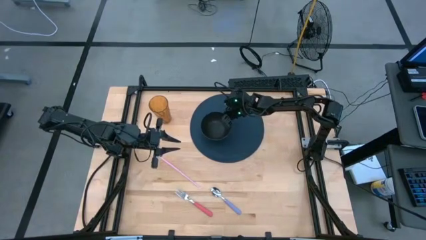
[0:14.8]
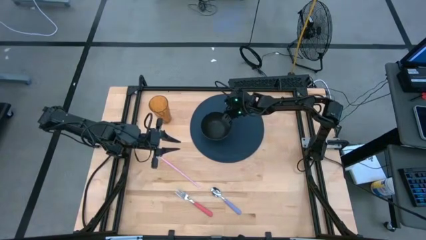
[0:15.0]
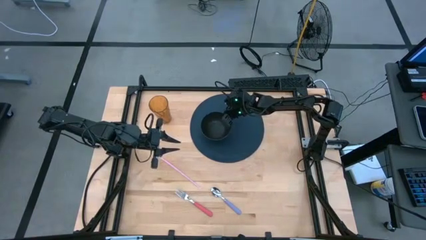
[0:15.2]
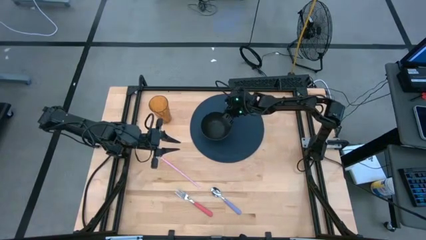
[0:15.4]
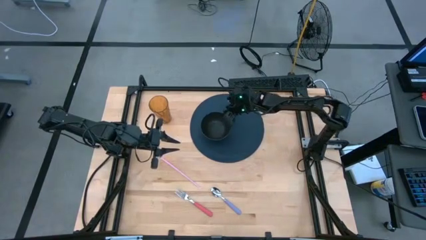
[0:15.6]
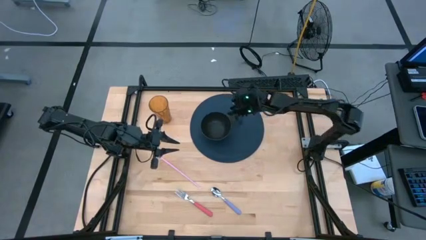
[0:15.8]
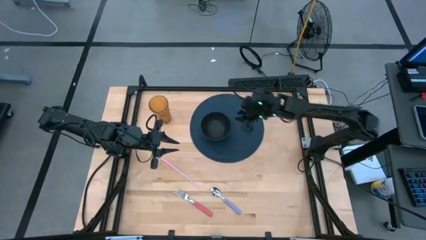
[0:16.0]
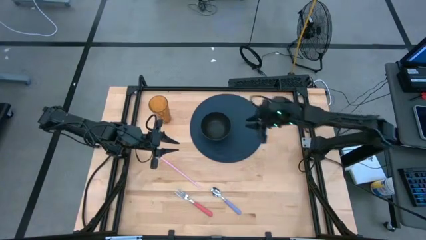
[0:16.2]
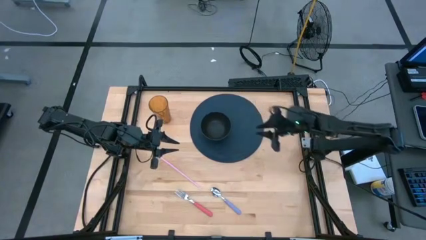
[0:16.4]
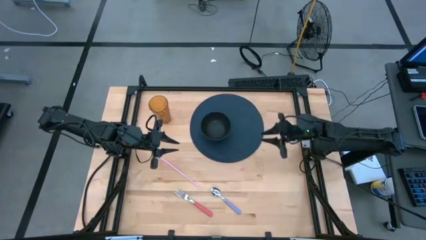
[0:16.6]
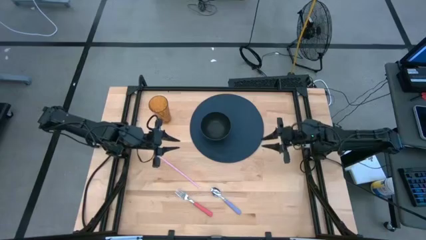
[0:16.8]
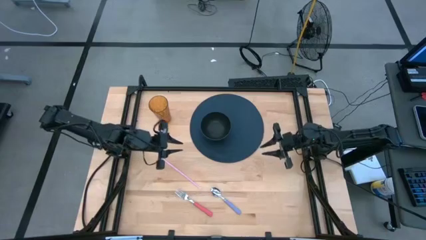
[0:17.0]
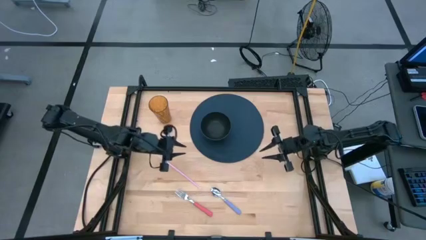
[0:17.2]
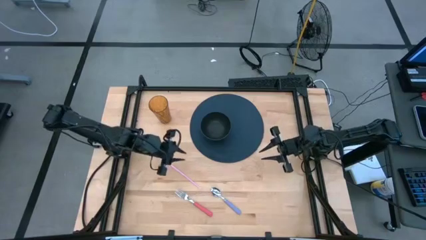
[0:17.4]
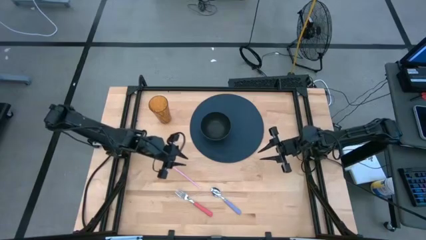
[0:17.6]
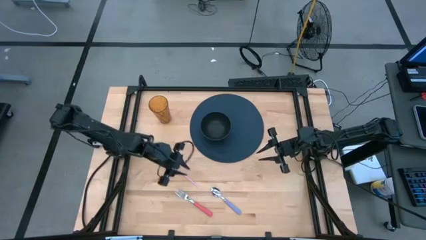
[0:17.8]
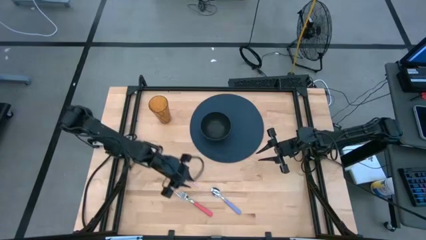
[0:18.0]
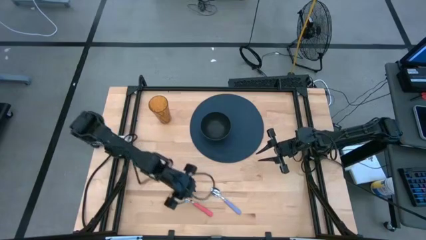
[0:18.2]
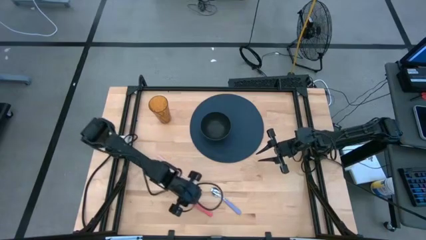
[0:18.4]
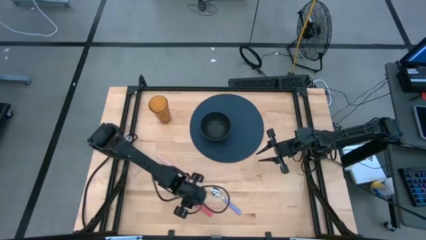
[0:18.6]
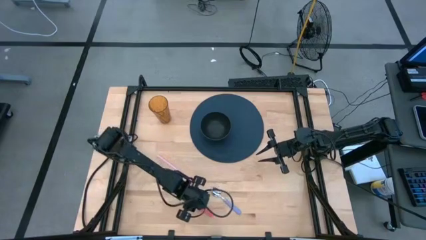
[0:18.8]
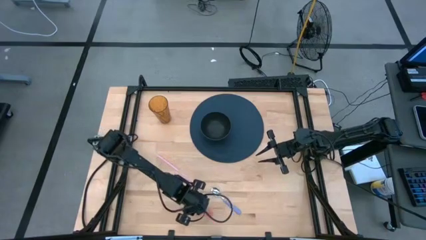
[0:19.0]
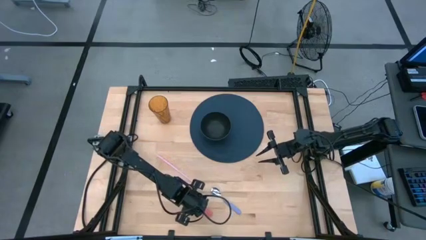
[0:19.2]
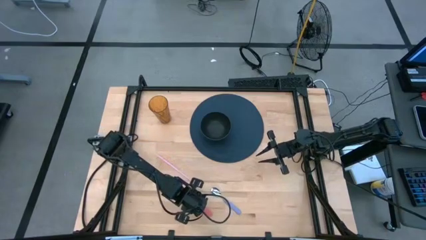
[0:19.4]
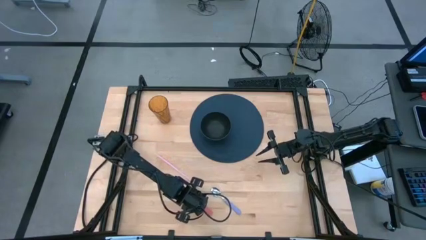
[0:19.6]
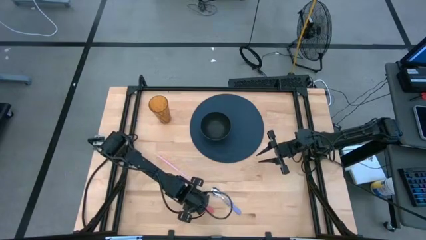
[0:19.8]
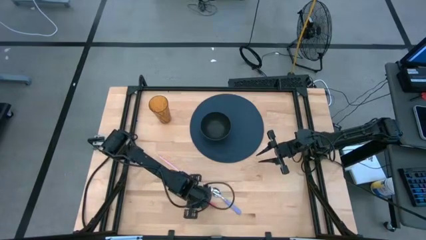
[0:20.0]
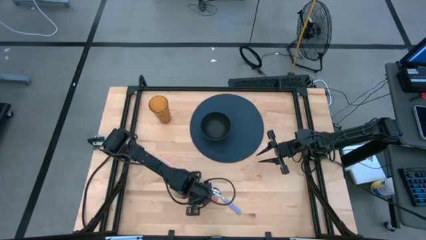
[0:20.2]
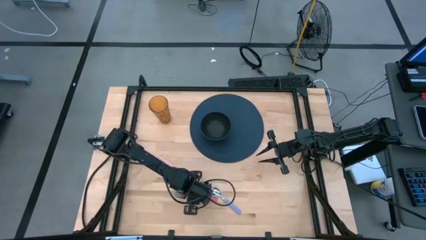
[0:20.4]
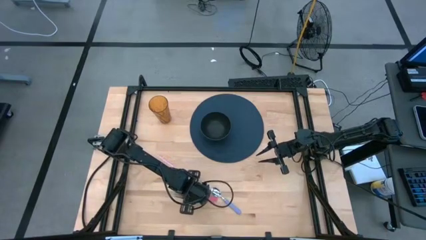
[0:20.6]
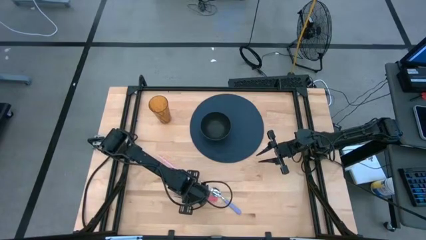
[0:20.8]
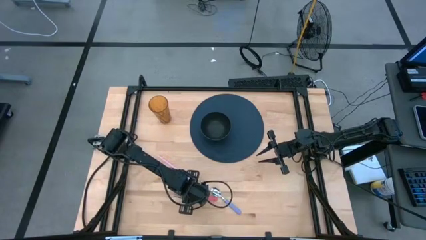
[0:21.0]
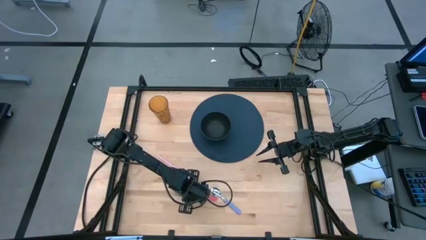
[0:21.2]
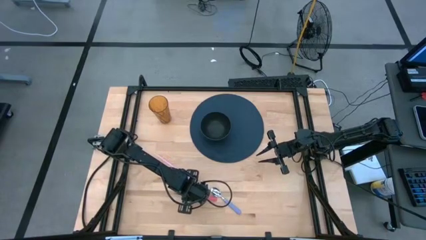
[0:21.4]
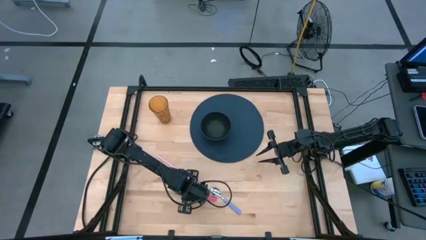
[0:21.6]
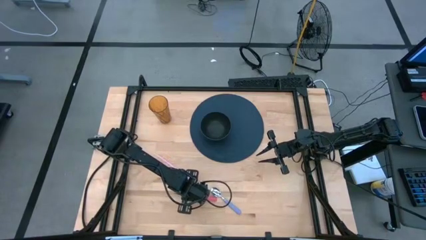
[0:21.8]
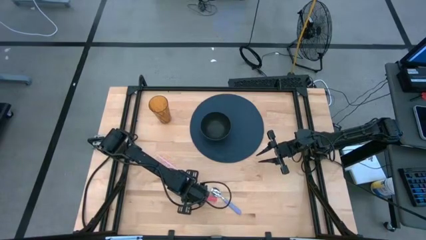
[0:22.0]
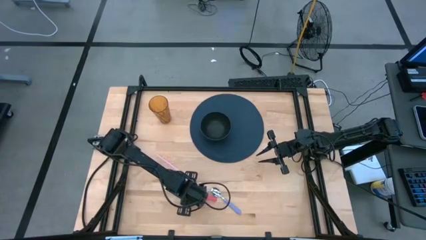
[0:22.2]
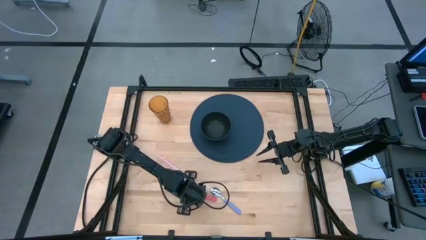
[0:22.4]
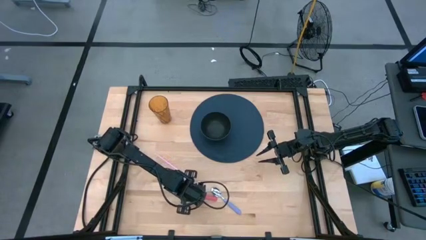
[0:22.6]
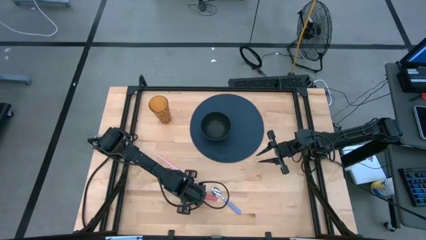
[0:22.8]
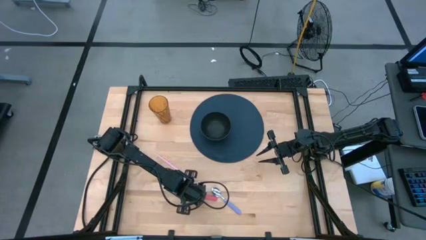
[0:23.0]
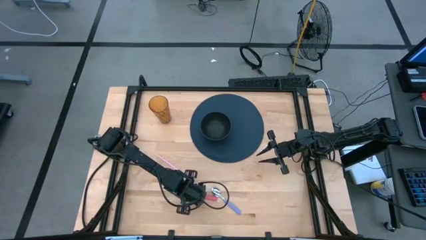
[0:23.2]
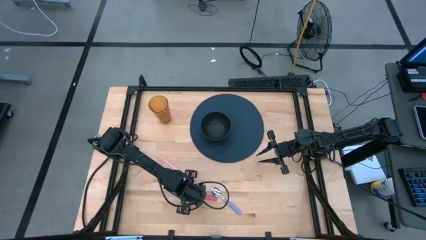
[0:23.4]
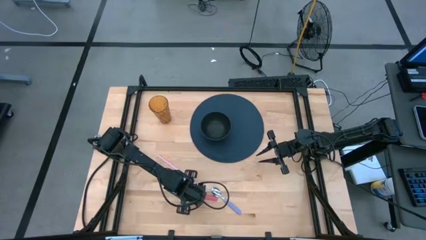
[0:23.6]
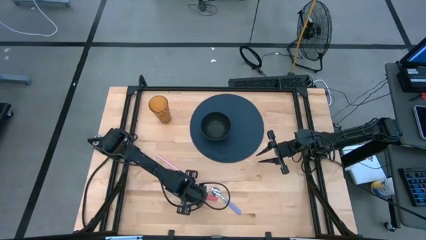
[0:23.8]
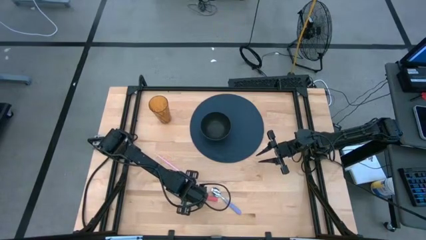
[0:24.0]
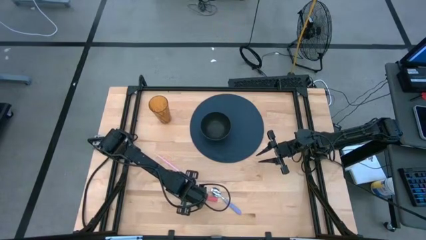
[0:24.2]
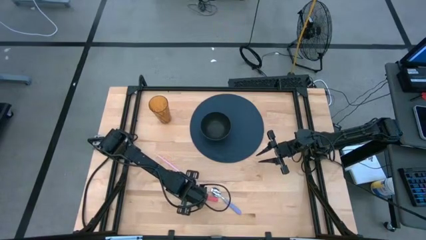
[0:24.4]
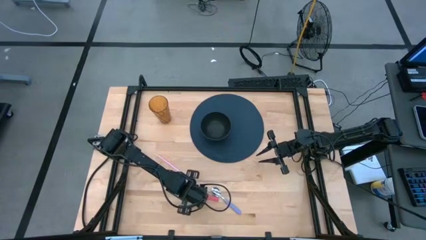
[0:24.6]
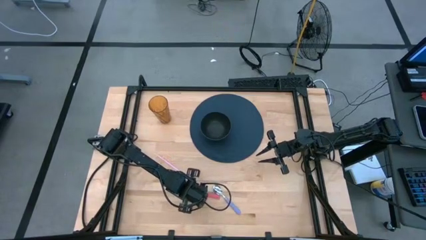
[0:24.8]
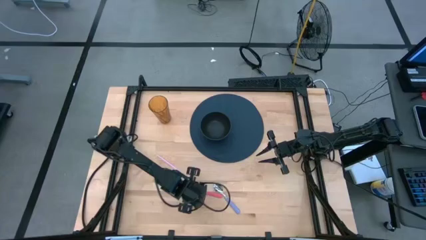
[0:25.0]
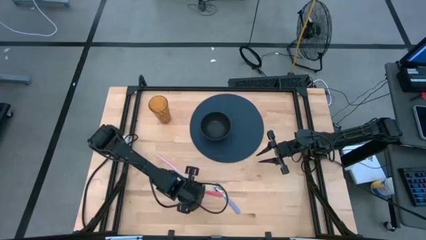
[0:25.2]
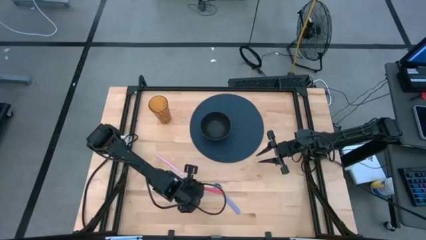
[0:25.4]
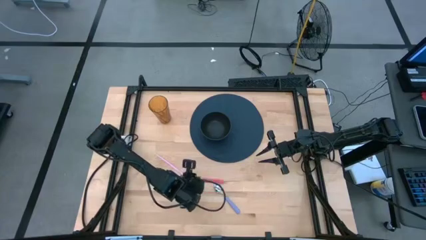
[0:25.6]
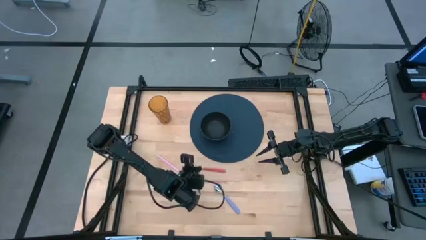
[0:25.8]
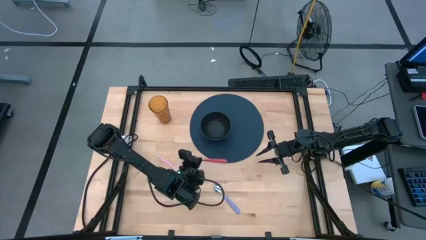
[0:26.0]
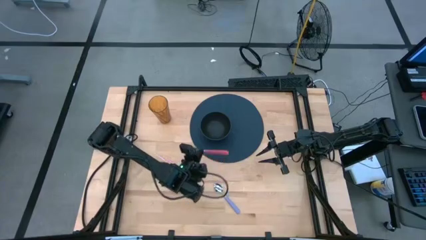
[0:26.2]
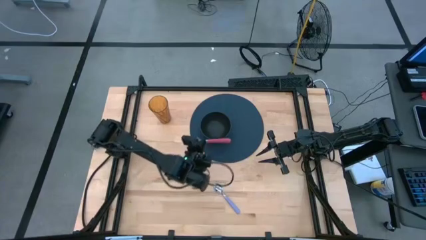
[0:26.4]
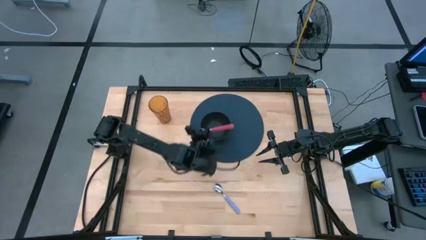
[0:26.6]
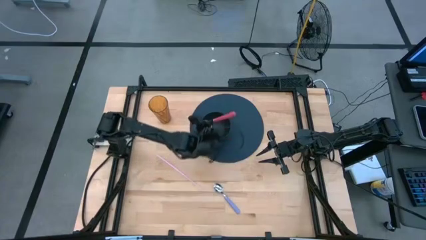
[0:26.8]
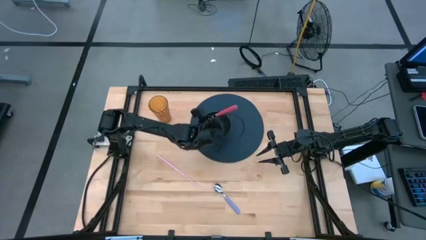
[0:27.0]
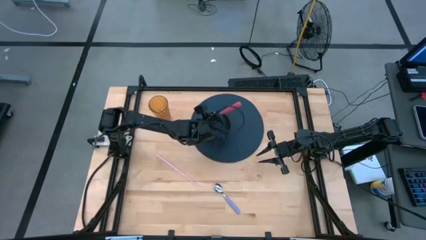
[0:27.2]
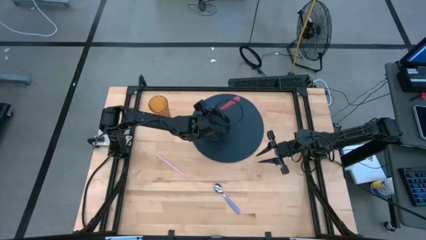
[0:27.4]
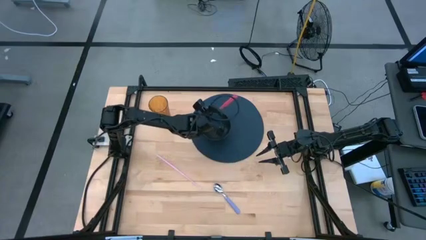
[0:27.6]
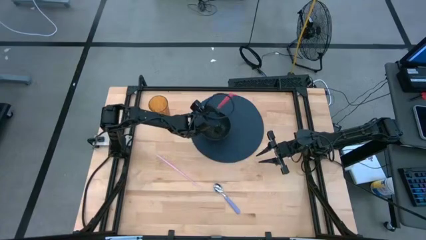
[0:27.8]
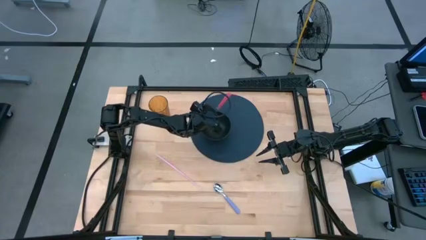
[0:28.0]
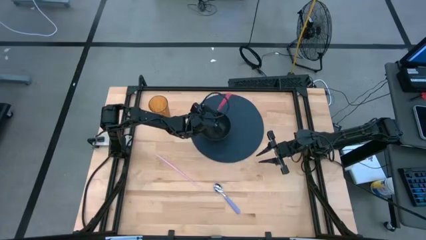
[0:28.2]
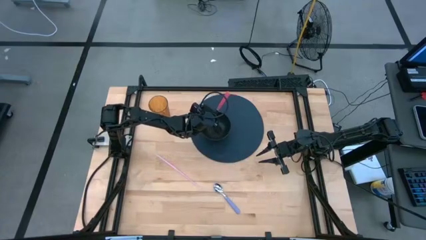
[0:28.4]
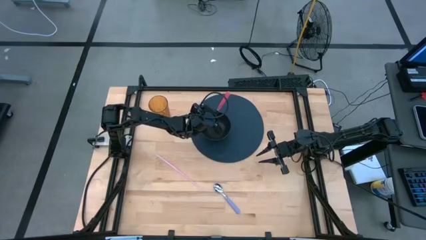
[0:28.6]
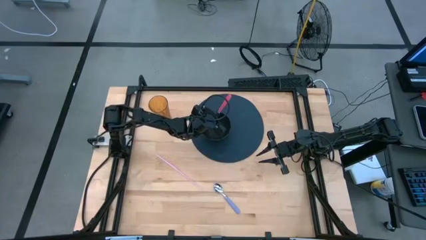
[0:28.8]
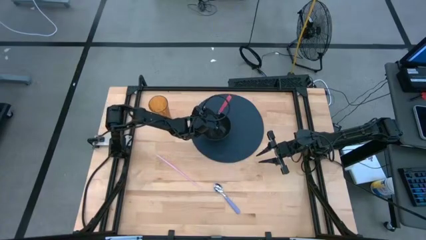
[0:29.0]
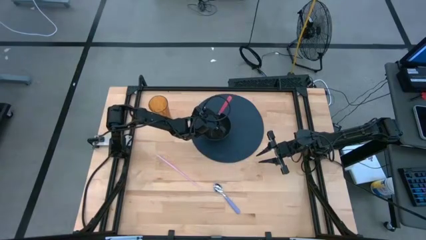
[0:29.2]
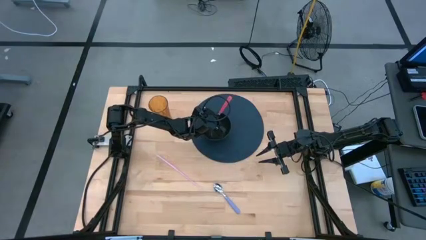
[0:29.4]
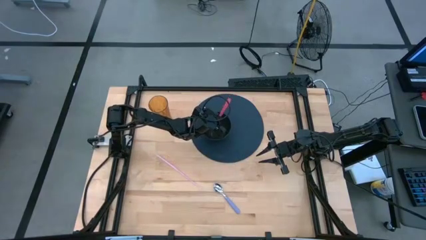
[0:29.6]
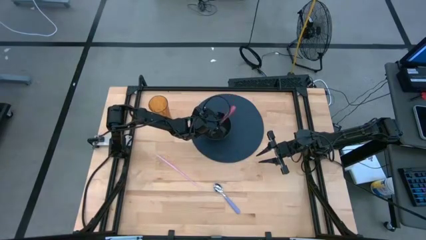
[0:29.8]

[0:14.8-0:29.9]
Task: Pick & Place Utensil
Put the fork into the bowl
